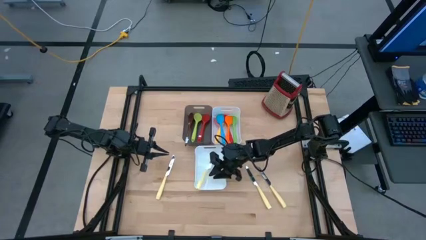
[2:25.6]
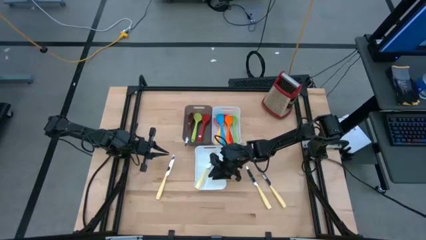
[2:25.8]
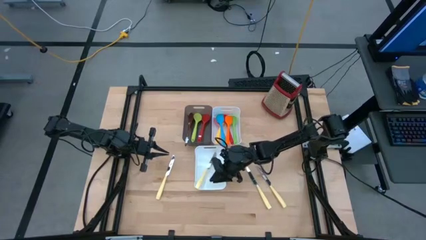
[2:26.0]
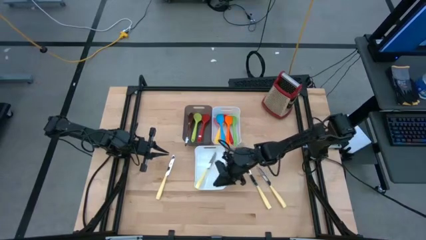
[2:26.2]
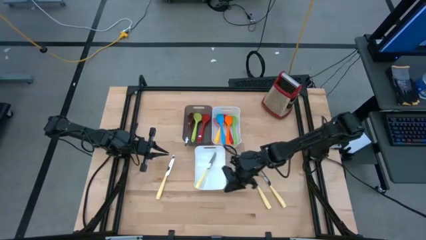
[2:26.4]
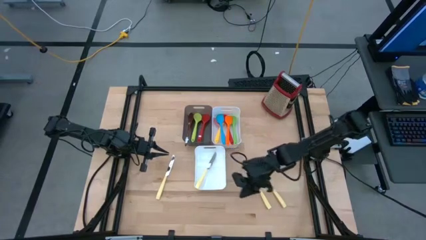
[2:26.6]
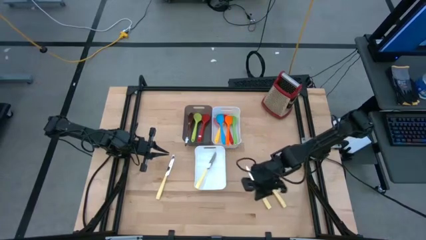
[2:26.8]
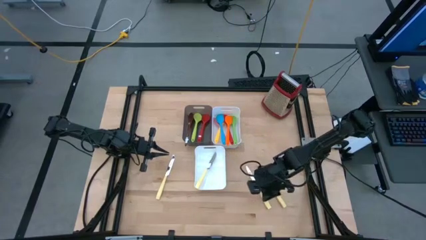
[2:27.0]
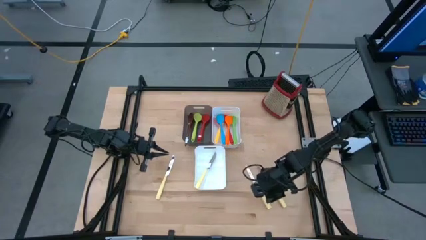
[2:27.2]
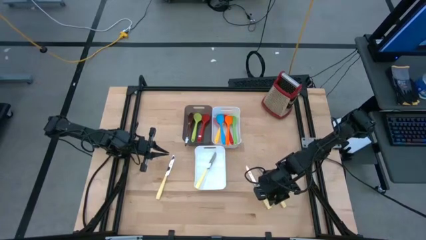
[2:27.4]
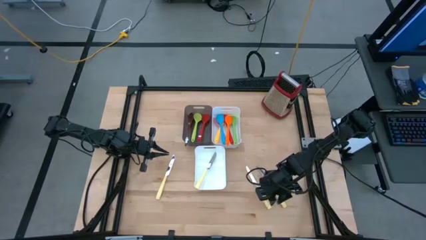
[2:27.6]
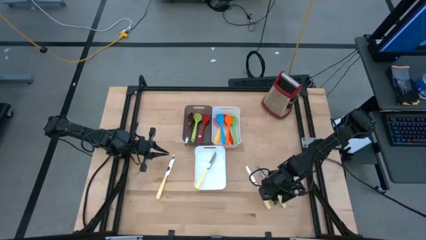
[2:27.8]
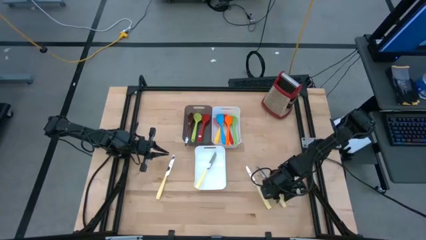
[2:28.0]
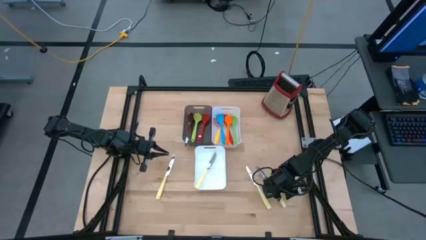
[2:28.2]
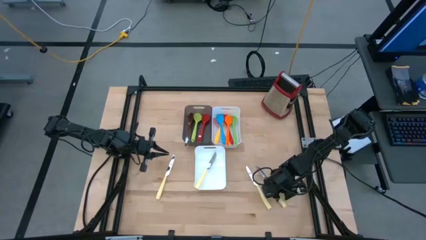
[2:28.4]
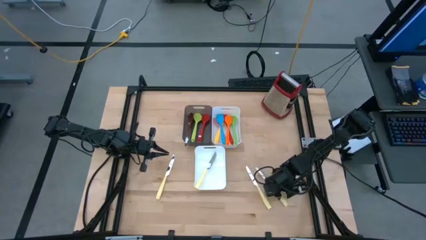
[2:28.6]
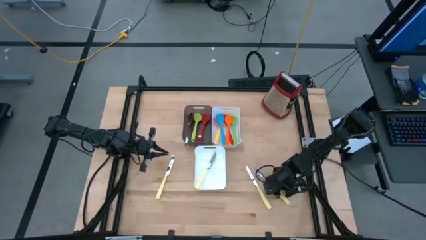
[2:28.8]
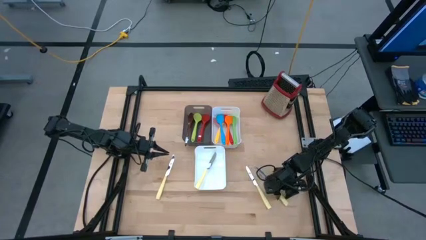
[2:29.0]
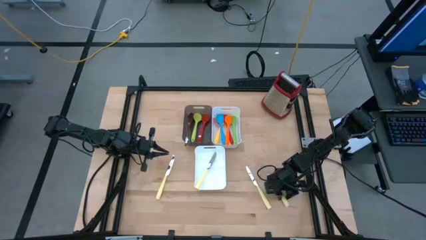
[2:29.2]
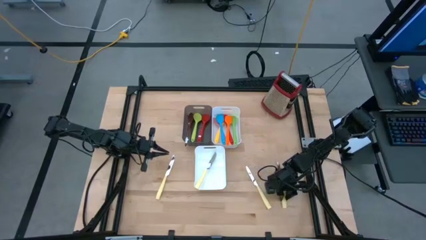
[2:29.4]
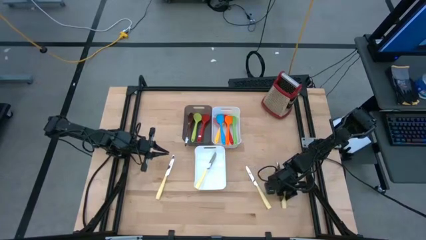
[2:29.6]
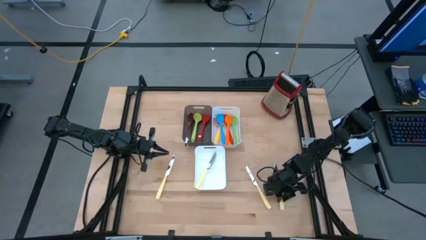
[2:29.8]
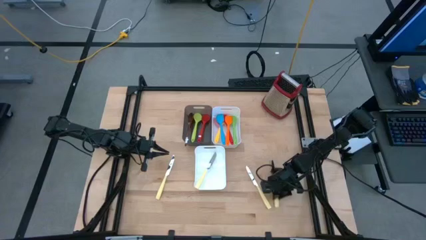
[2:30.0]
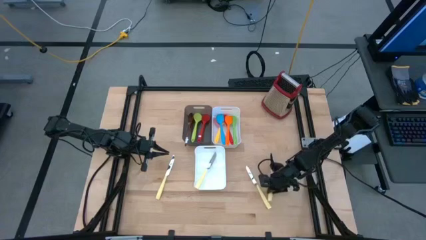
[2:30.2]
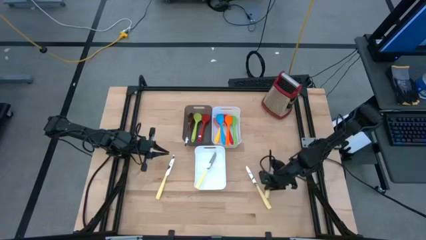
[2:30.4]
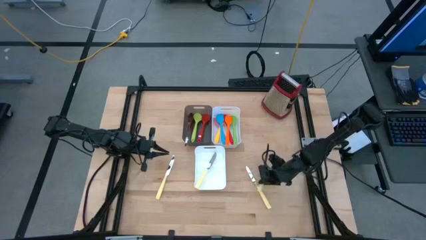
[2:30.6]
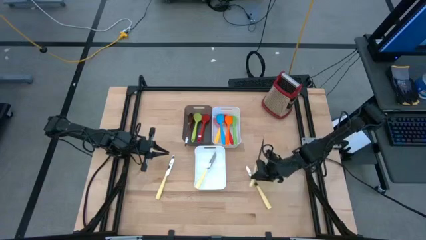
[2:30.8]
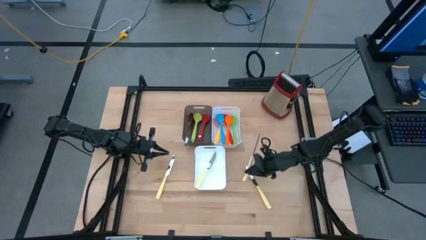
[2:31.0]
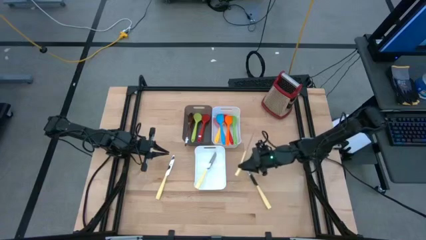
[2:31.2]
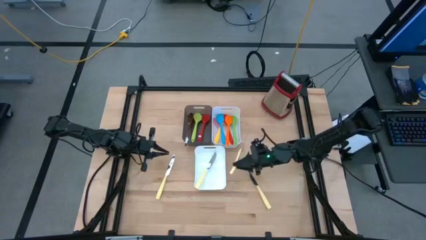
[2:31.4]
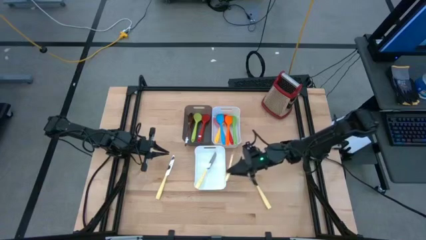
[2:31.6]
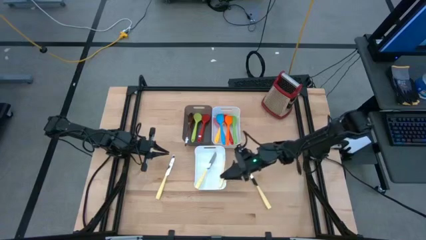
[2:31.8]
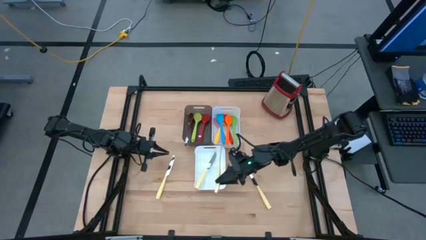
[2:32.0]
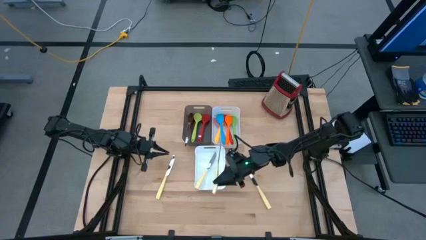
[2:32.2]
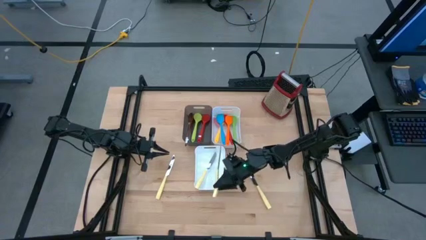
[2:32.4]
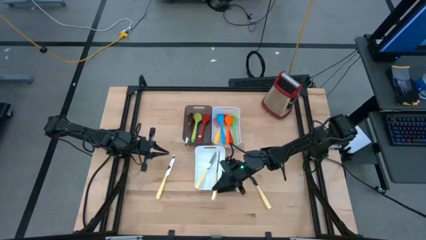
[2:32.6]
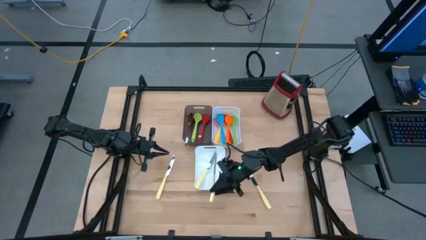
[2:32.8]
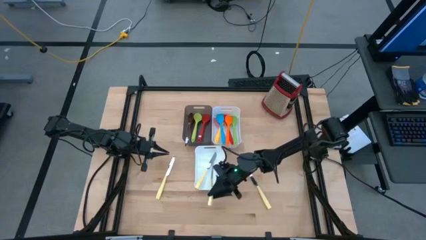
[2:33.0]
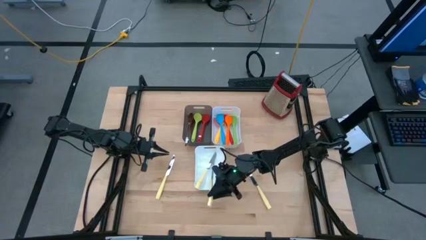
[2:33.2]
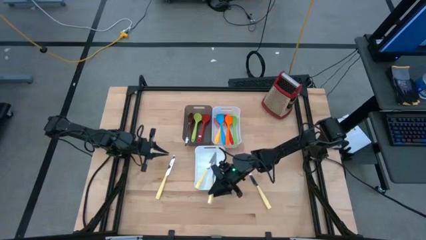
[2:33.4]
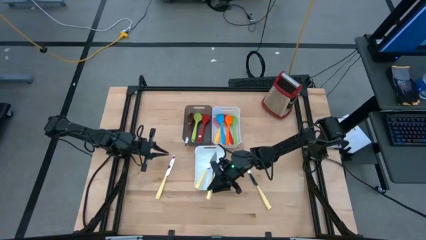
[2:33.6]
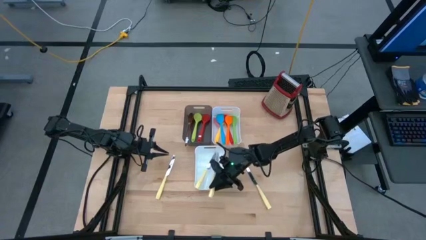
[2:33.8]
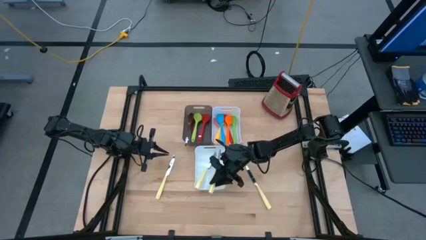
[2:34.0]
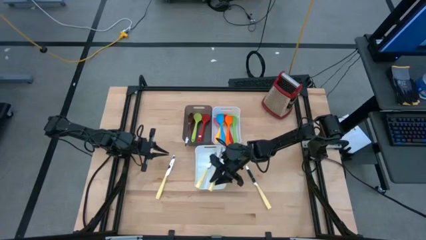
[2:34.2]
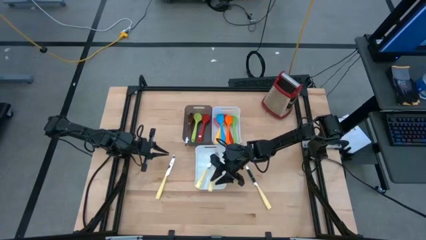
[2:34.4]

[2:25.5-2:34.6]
Task: Pick & Place Kitchen Items
Put the yellow knife into the bottom white bin
